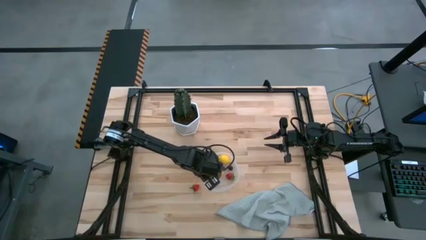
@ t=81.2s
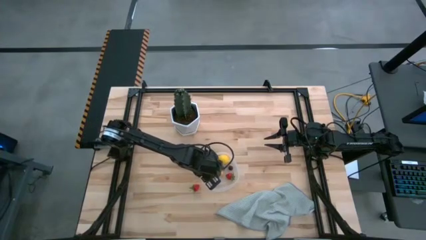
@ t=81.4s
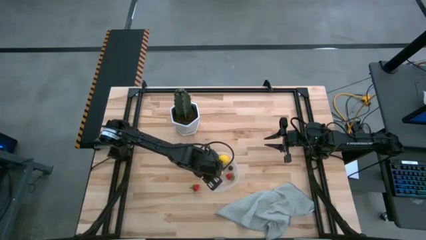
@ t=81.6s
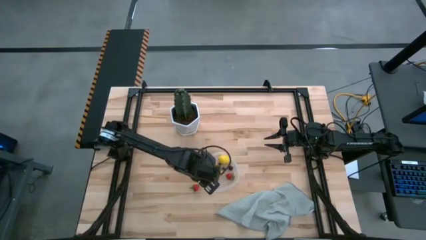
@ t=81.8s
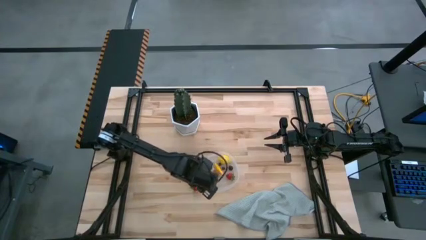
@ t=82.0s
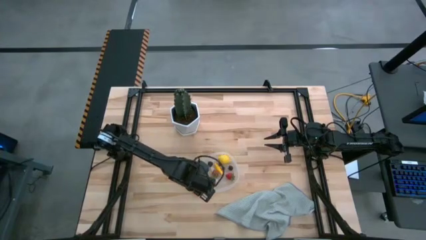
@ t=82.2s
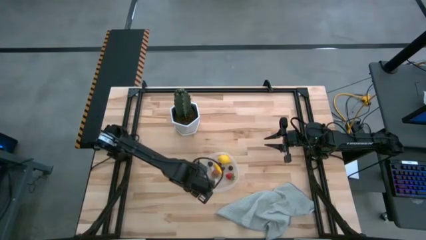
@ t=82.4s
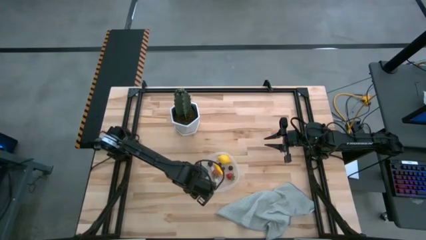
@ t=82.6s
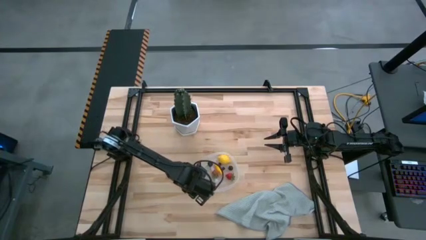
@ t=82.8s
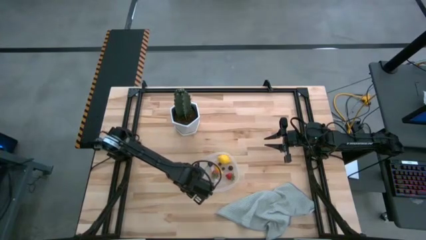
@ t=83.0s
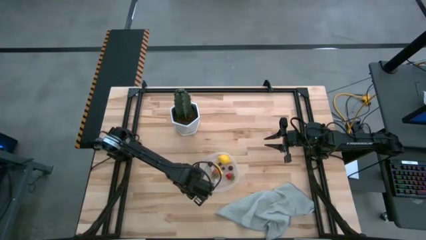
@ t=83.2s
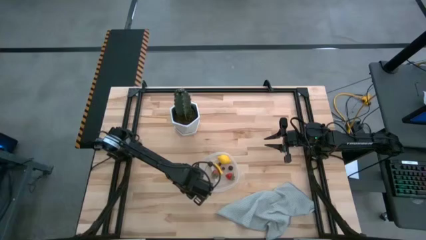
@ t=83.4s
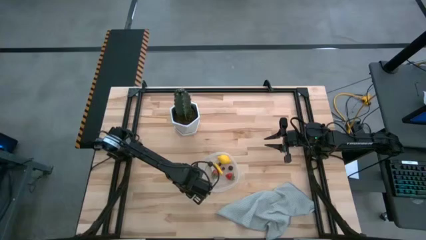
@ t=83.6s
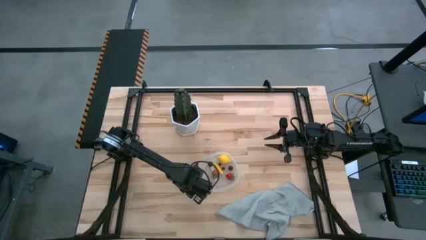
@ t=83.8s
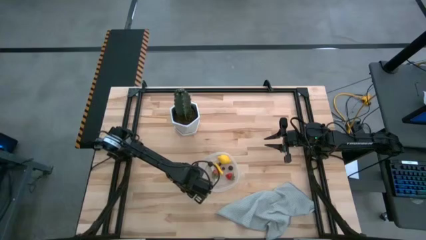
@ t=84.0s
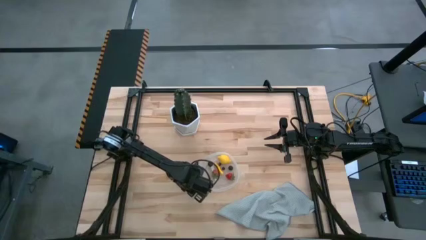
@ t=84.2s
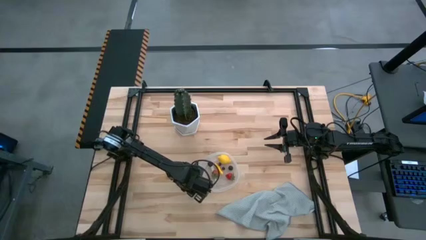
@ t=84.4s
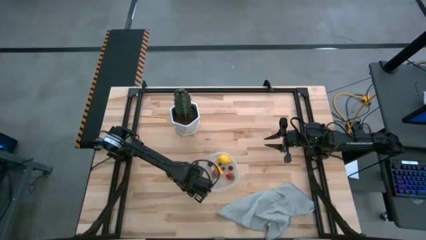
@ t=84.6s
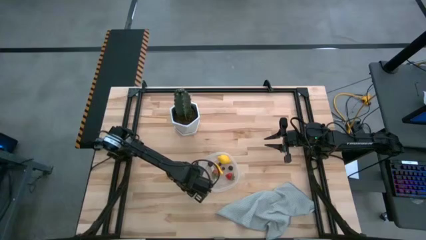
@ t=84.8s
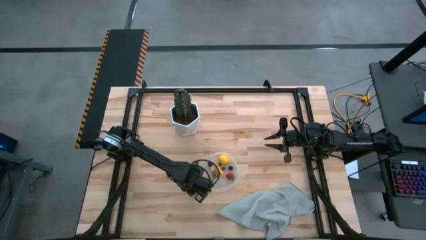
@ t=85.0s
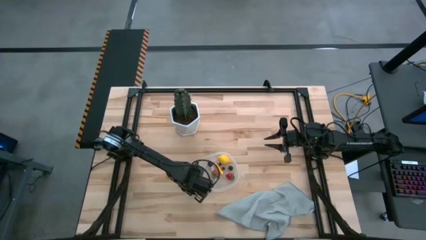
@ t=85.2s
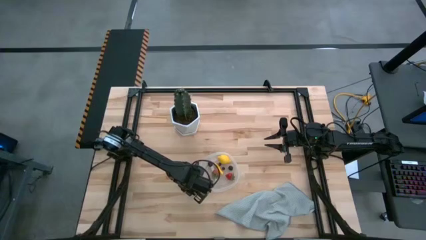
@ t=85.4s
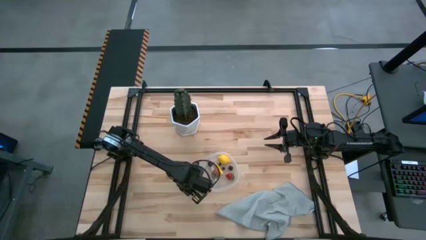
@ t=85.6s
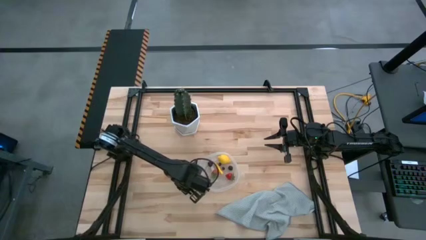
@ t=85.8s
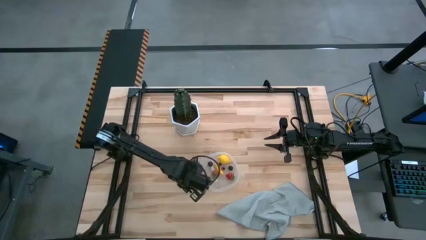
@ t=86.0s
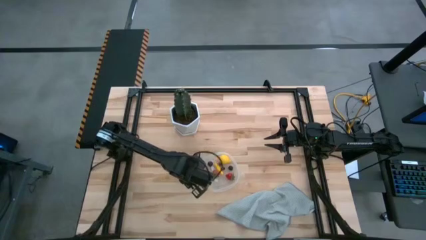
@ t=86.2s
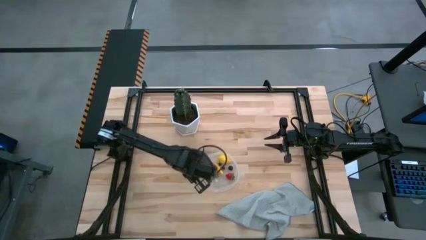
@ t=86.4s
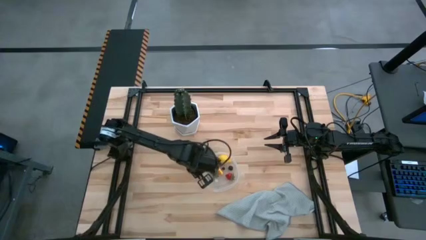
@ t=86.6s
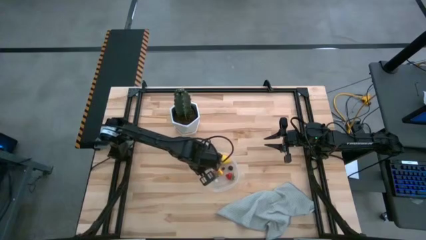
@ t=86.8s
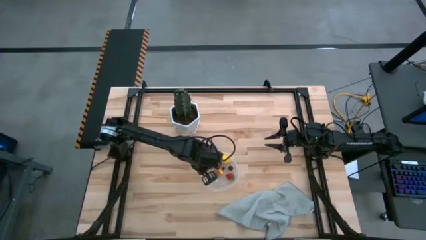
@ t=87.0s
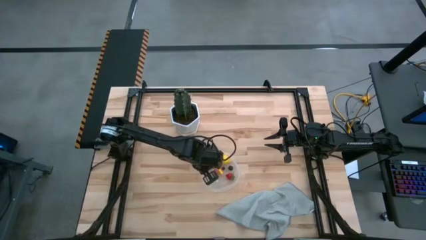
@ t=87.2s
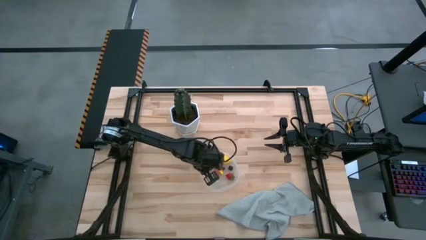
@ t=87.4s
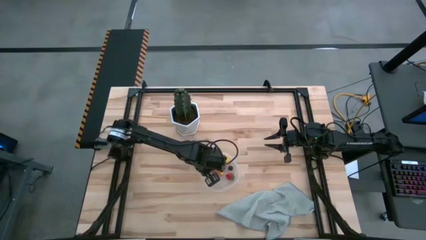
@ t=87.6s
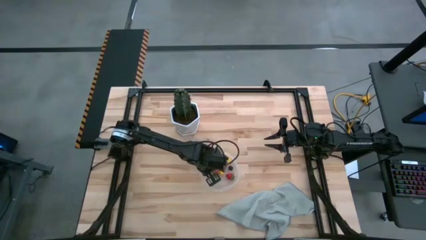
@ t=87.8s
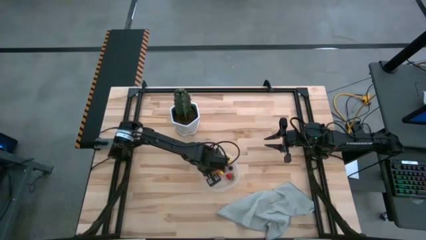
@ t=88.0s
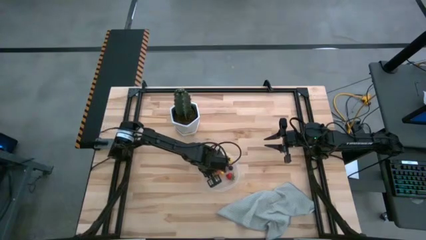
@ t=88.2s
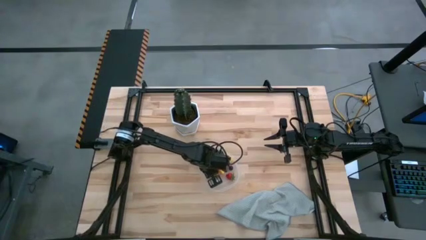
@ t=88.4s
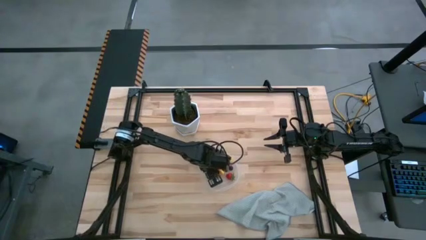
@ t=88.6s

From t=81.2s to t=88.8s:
Task: Pick and placing Produce into tupperware
Put the red strawberry into the transparent container

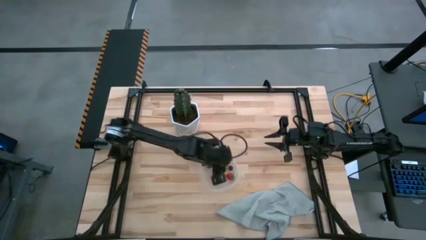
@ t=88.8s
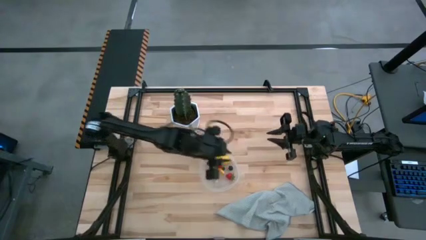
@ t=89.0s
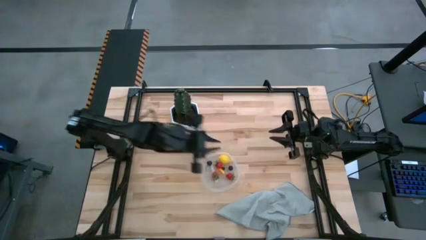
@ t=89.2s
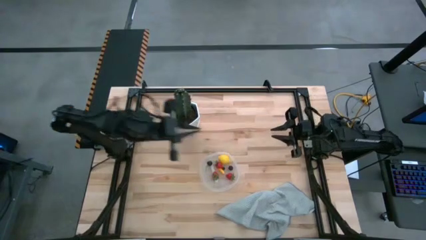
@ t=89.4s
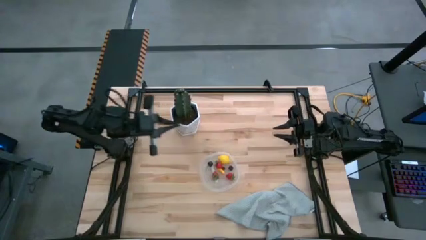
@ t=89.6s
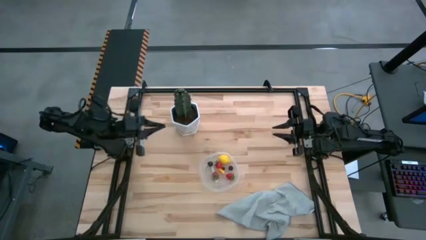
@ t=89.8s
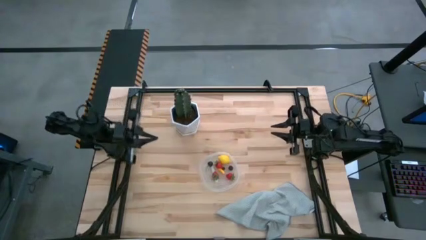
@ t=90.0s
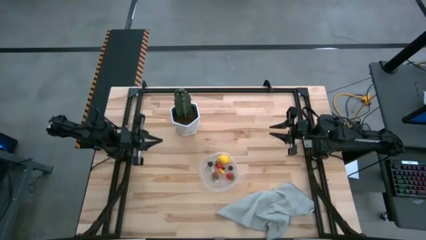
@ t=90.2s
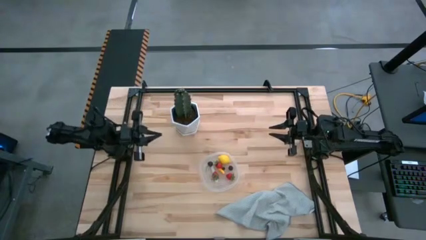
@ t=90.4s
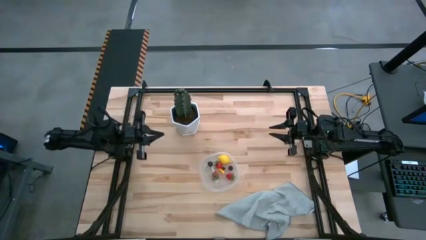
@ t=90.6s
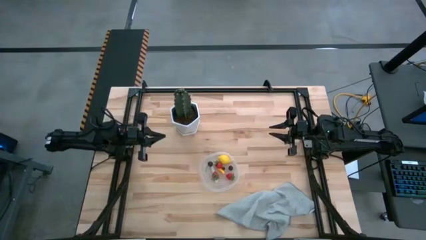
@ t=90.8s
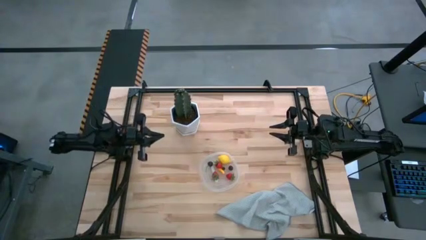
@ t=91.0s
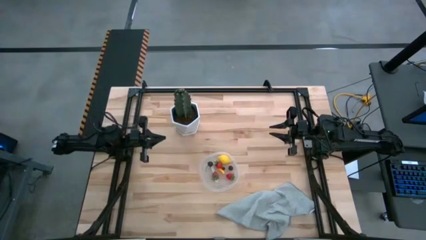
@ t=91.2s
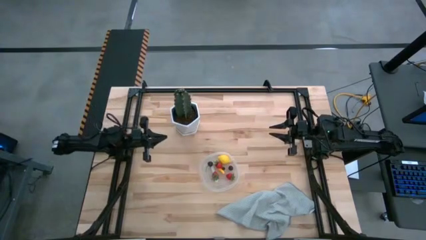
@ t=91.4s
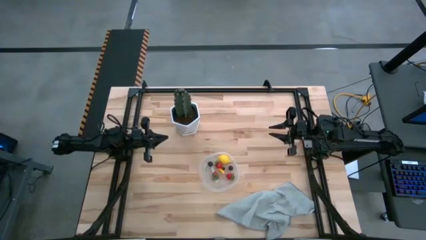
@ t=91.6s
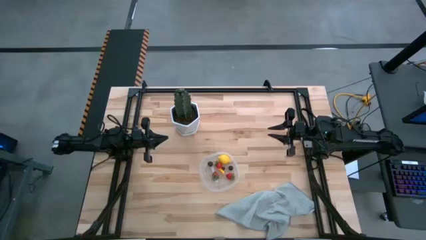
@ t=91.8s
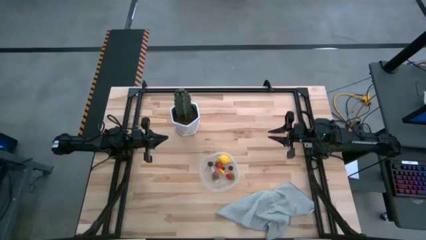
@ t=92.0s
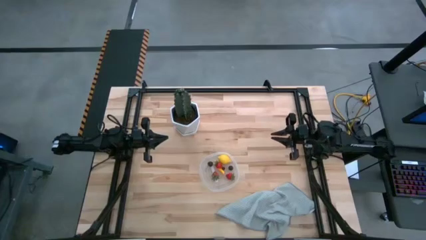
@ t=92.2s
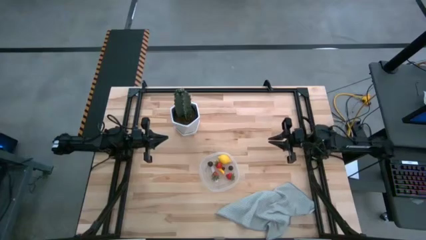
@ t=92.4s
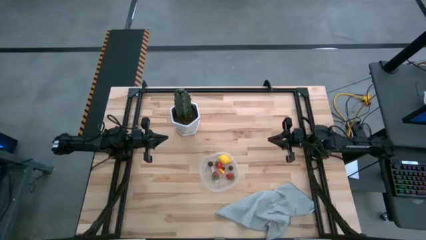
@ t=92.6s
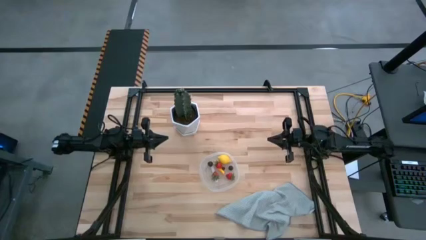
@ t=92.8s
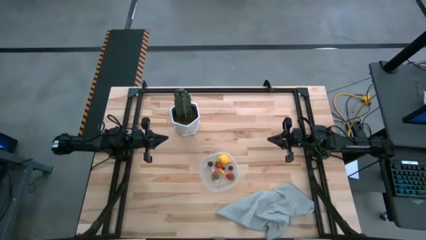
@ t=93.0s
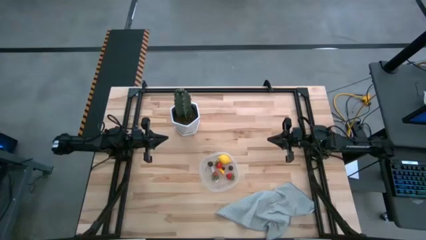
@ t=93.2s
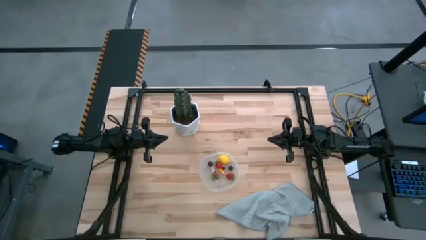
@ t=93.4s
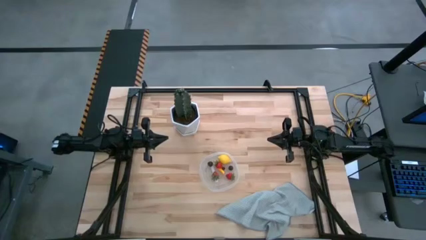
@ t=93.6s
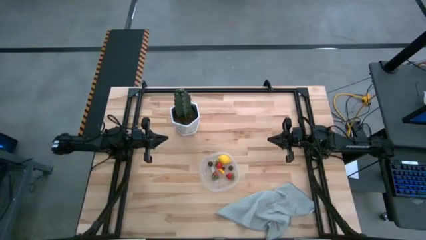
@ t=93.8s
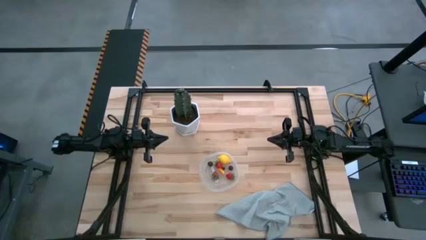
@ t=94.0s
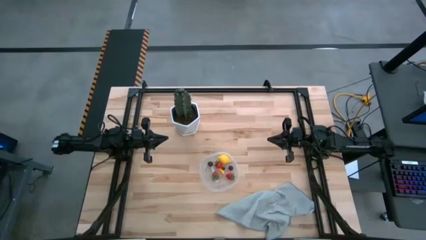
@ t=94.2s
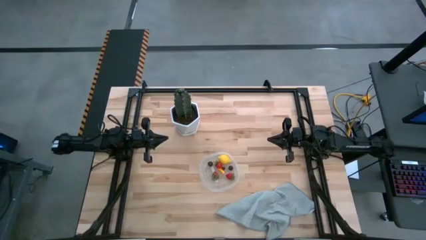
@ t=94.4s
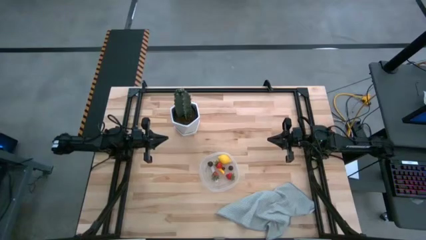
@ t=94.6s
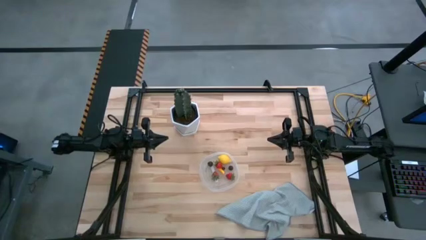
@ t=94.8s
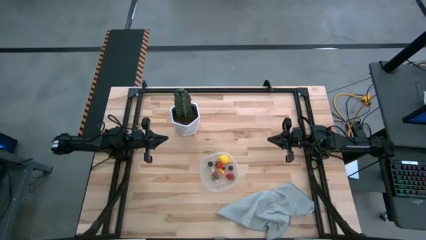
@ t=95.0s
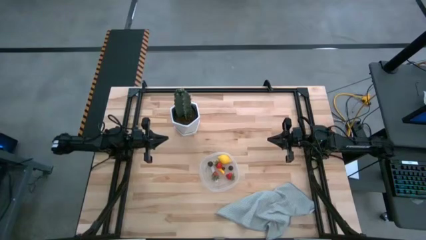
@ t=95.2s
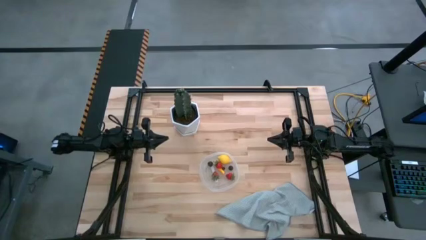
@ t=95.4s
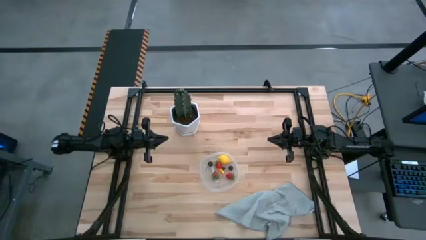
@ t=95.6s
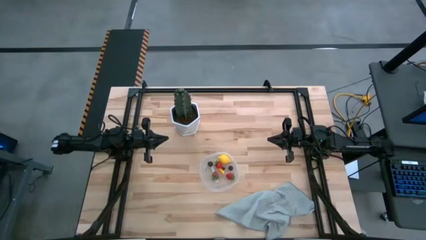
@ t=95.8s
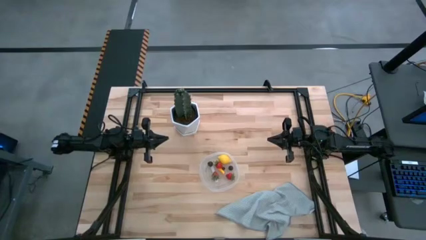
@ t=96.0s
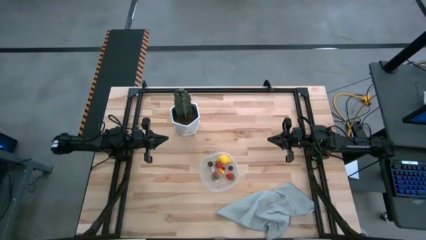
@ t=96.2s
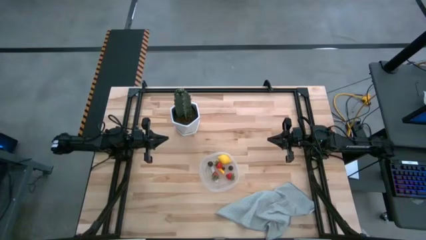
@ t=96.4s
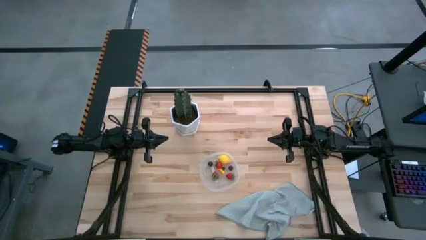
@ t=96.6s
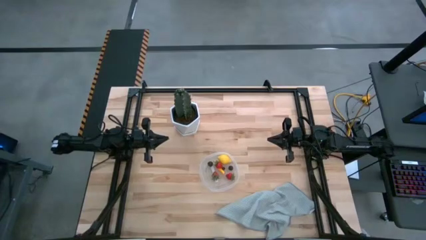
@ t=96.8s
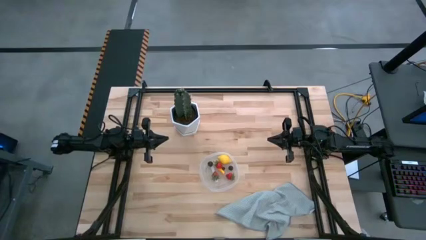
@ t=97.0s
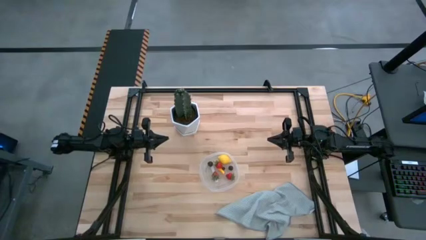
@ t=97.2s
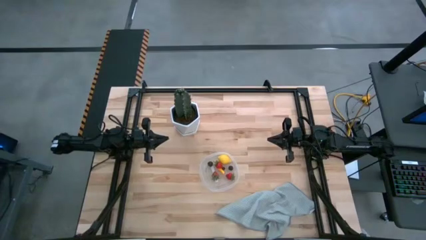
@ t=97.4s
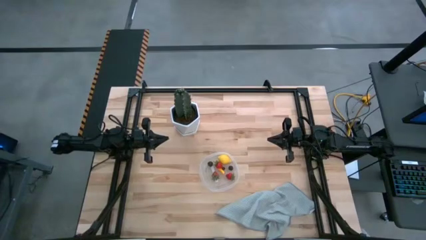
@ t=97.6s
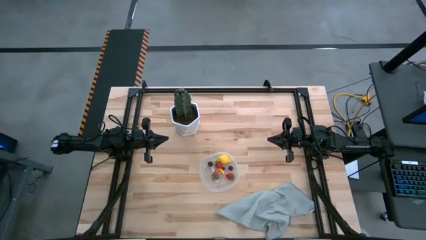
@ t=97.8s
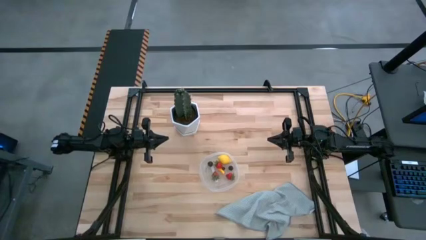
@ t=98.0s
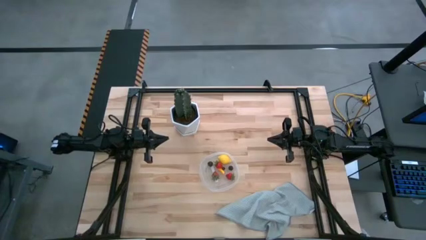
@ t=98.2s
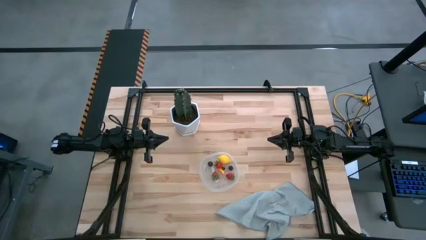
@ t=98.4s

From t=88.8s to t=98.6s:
Return to Home Position
